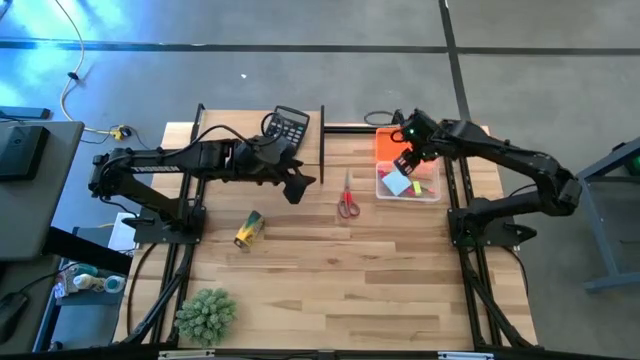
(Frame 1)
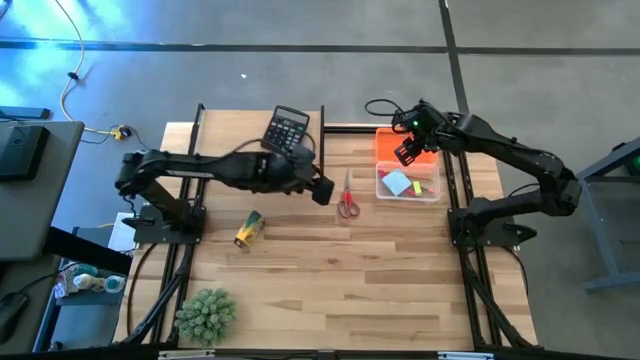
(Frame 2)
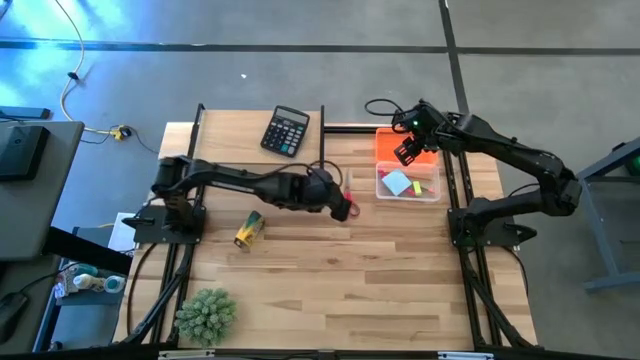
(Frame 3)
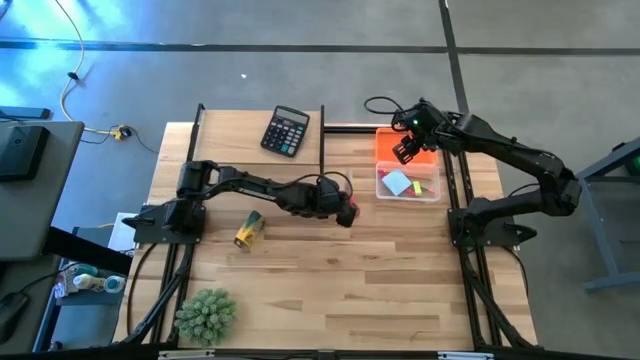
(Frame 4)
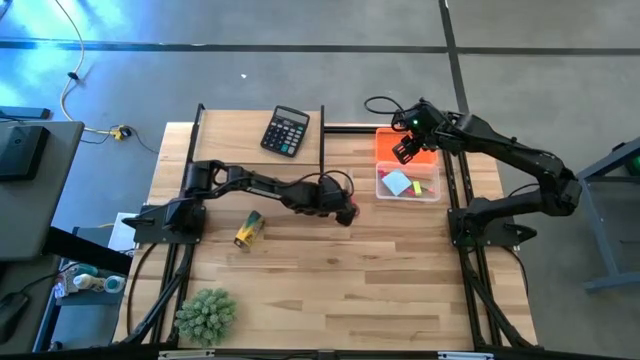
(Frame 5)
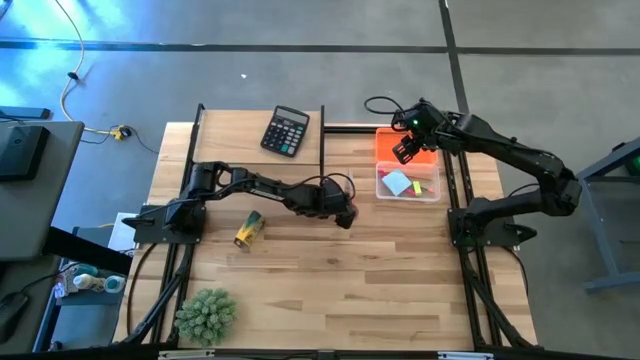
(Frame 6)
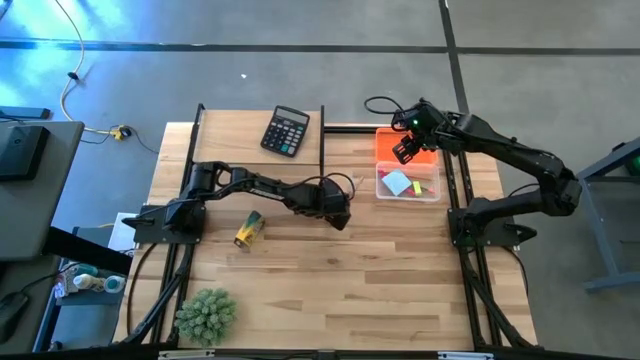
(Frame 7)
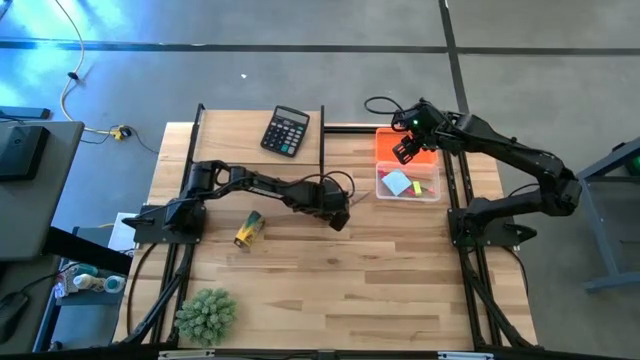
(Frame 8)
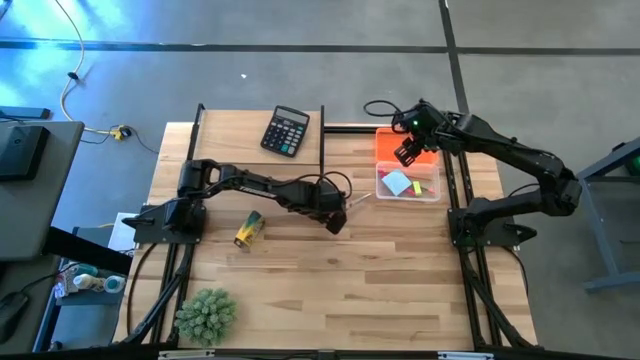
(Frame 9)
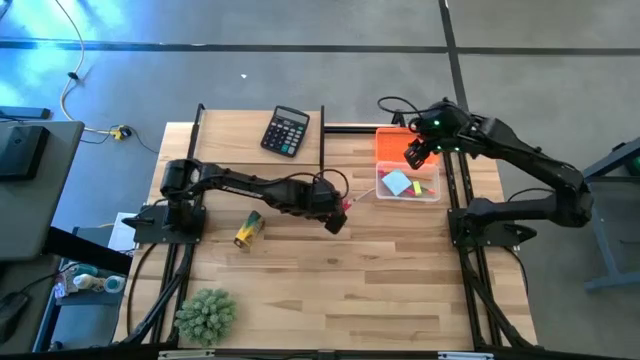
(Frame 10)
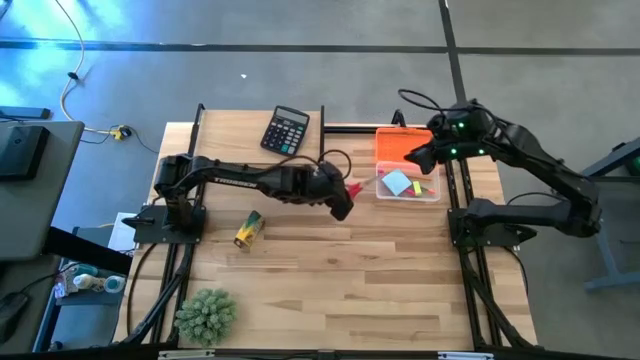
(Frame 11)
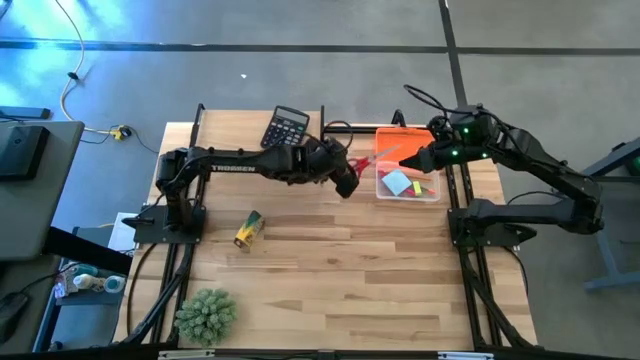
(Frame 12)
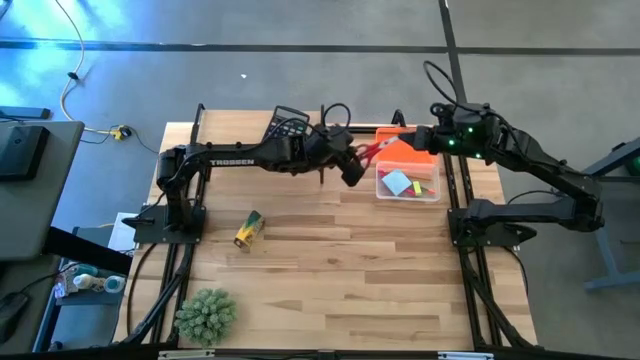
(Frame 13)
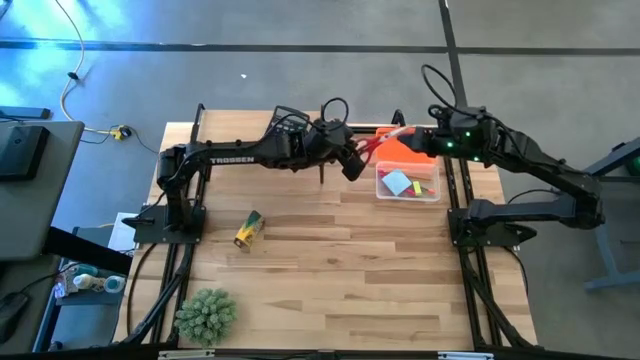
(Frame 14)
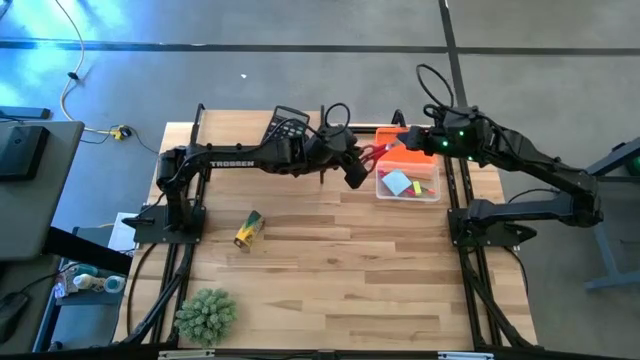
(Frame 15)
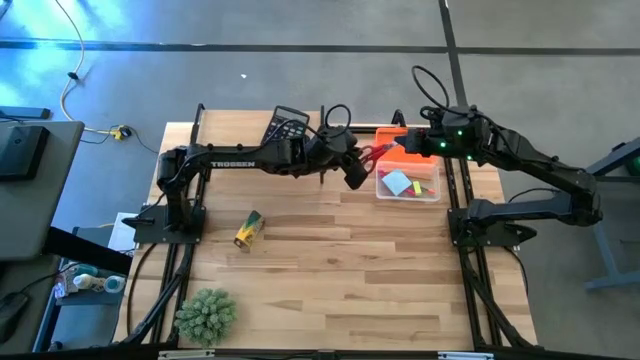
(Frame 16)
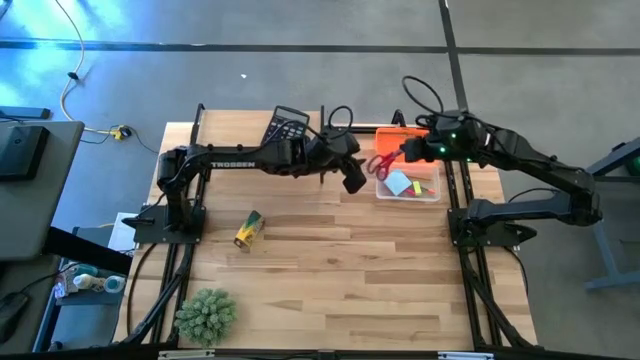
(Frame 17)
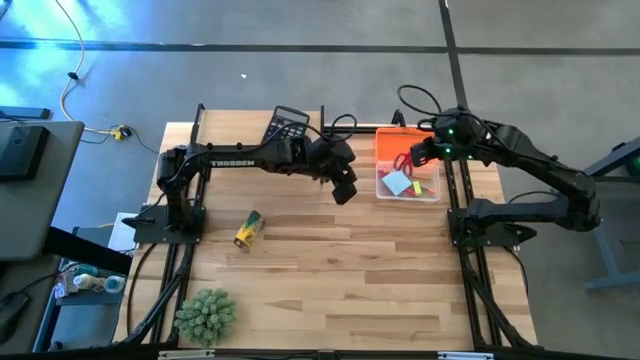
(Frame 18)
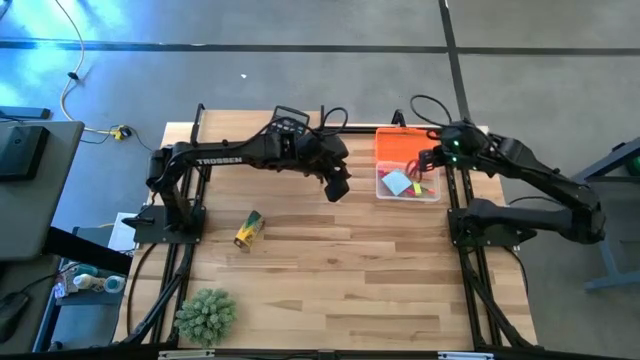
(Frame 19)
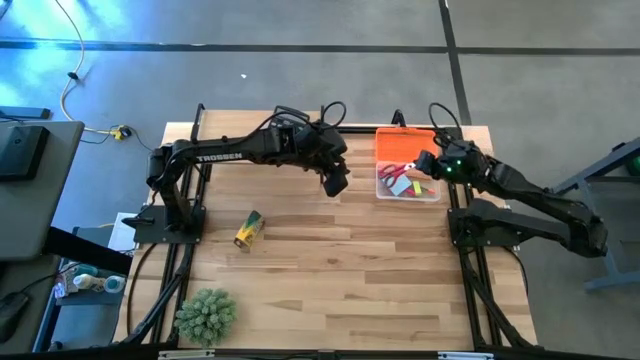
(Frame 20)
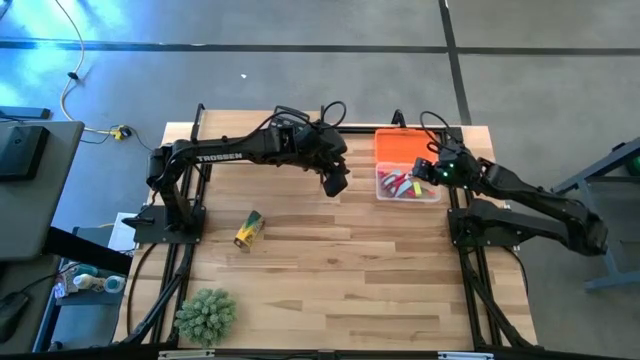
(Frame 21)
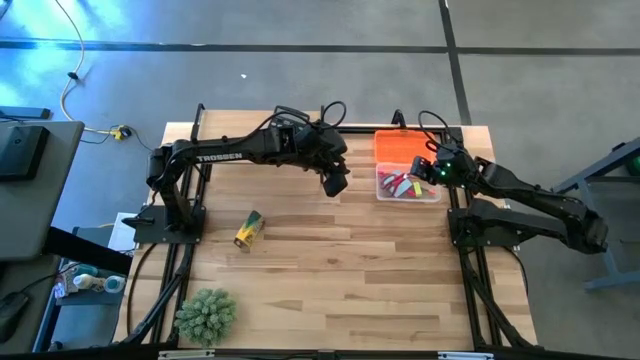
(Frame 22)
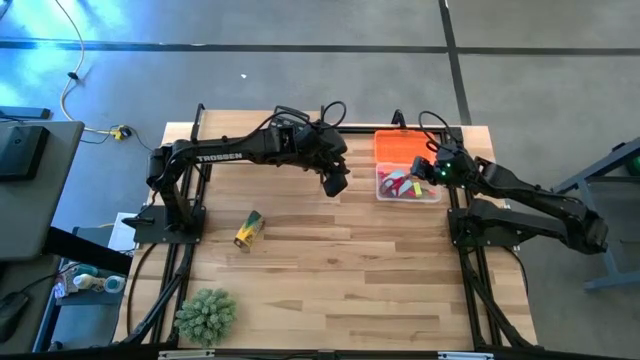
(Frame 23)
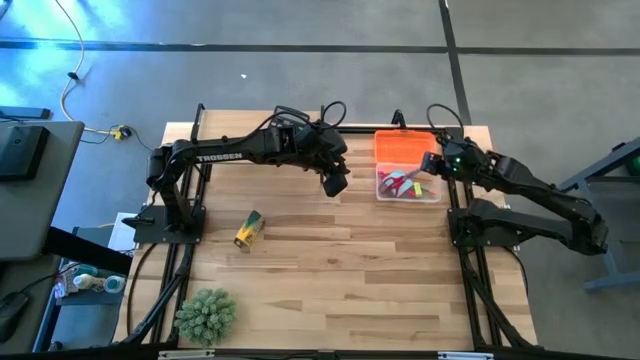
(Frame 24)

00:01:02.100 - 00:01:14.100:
Task: Pack school essentials
Put the red scissors into the orange supply box

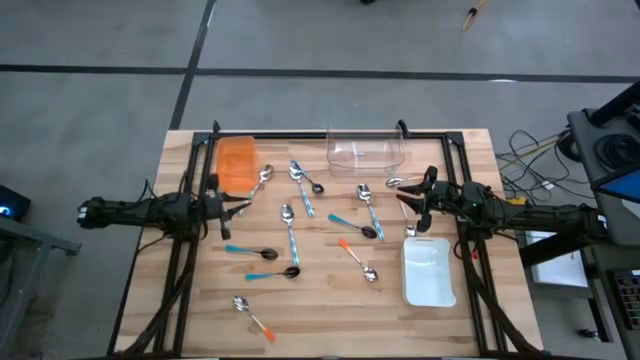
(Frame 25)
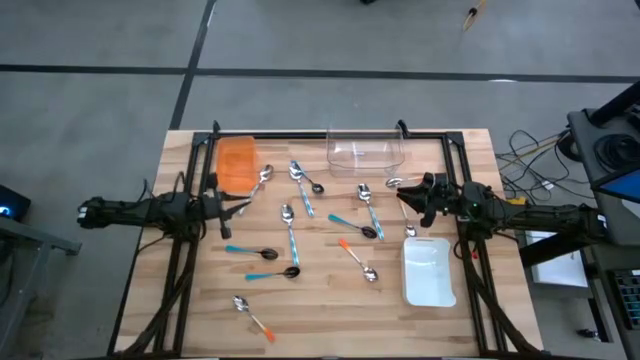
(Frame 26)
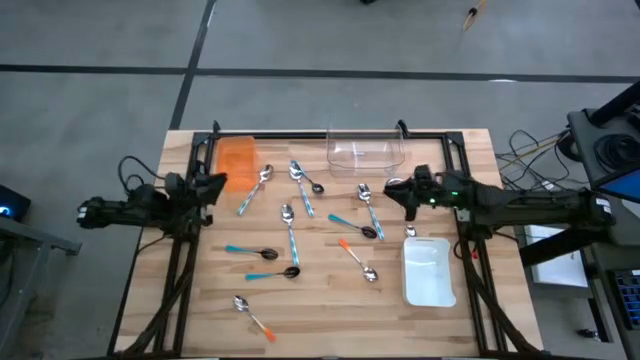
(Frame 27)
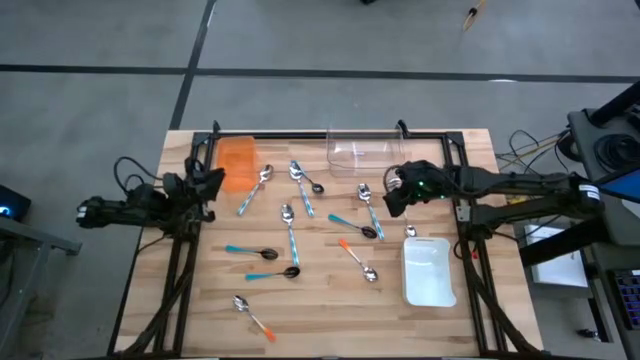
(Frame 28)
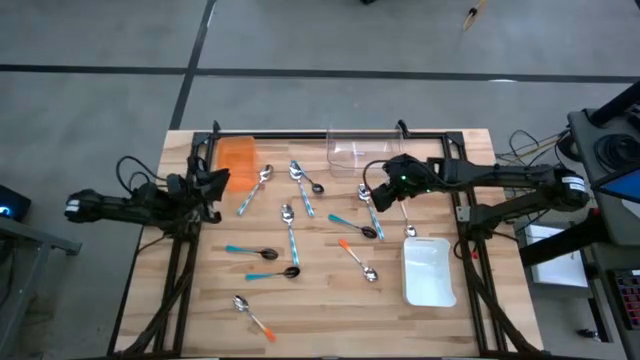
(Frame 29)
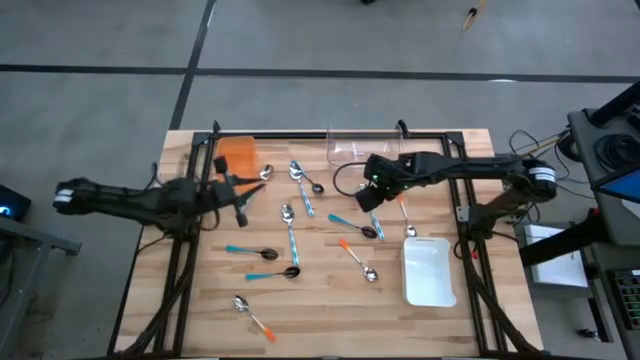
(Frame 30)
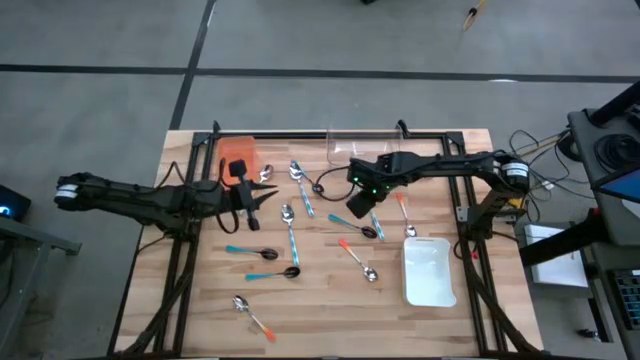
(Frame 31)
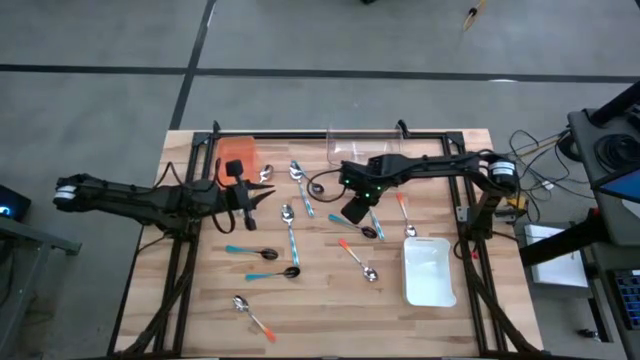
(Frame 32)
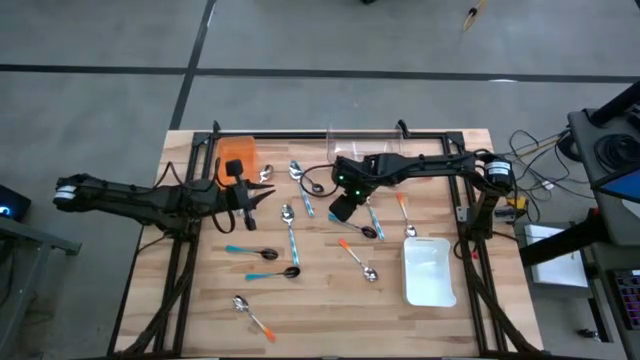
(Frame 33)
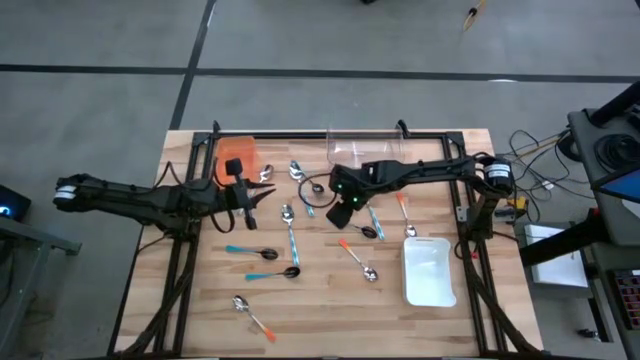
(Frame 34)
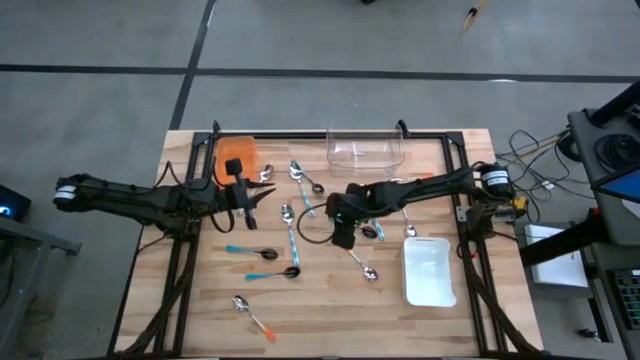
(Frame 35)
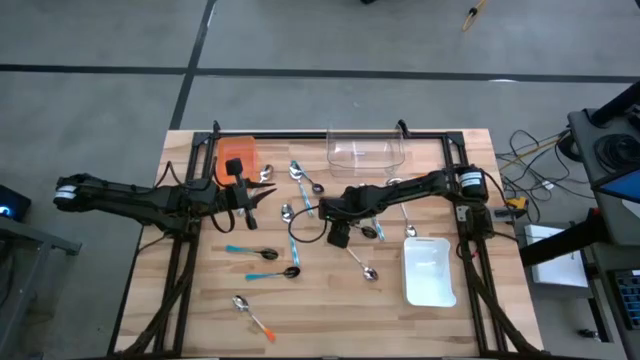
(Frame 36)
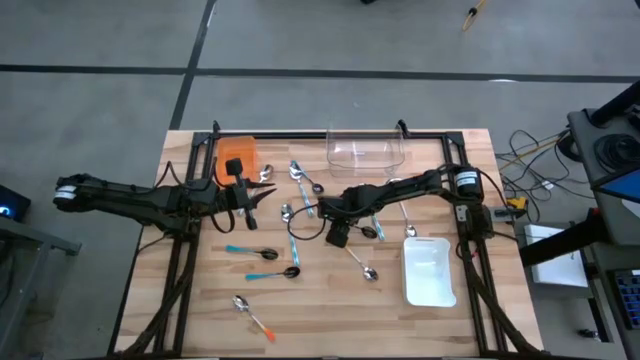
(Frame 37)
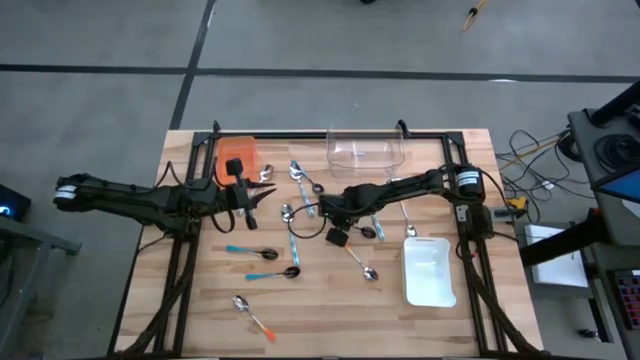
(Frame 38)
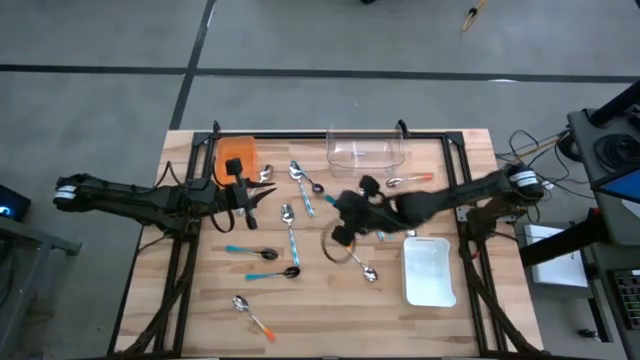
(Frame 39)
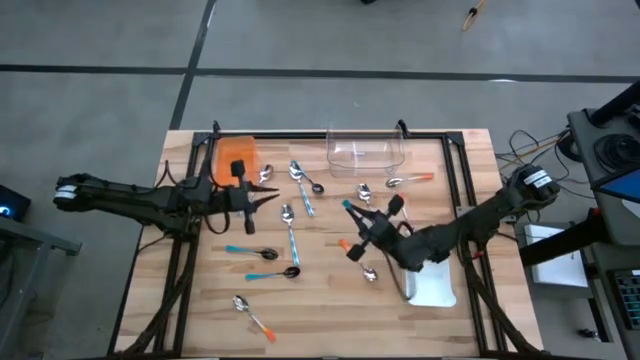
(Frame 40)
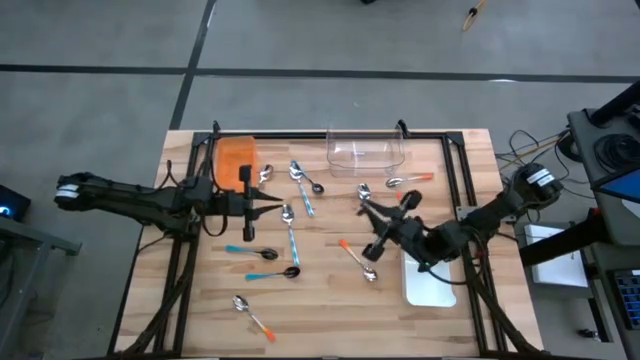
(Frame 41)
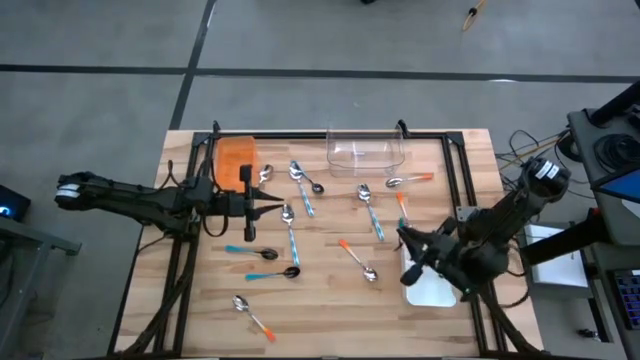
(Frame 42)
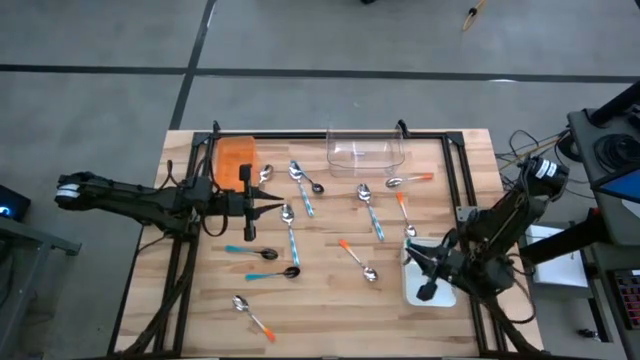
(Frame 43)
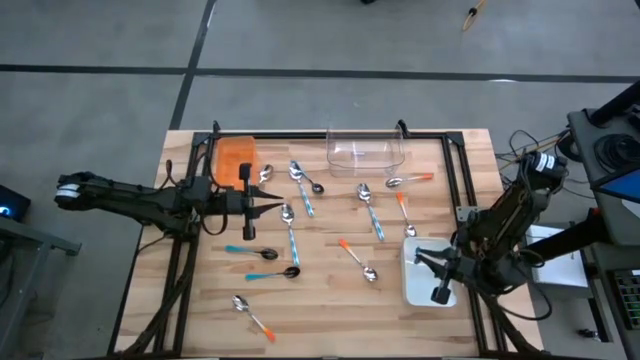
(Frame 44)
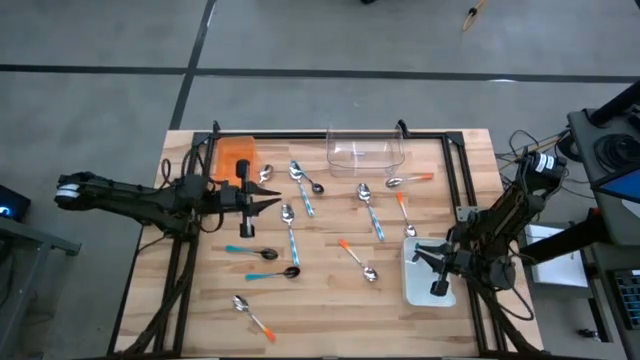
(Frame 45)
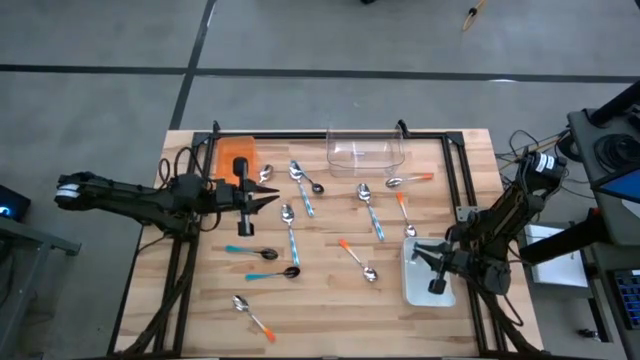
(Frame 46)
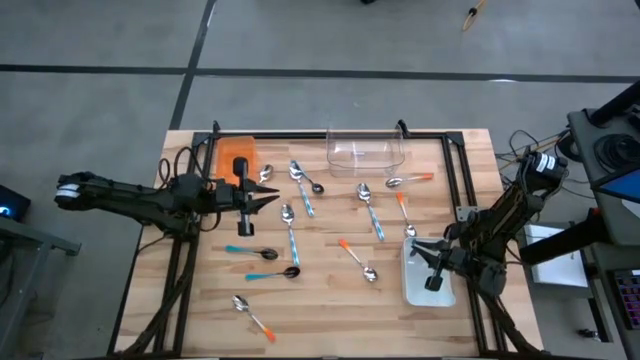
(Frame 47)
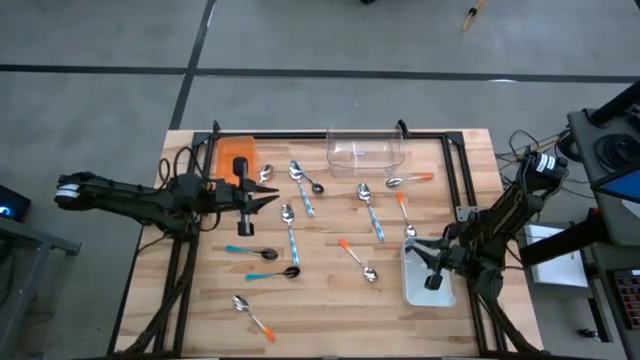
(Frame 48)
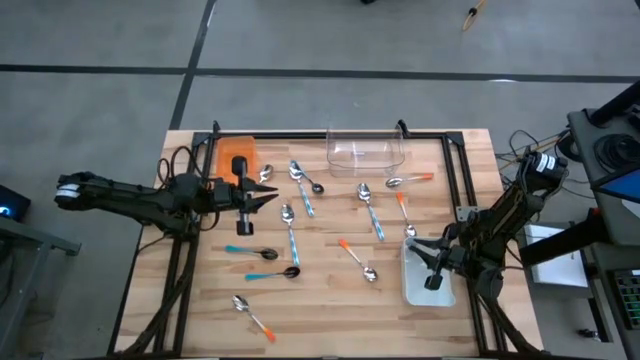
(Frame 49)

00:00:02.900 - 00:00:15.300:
Task: Sort silverware by color (type)
Put the blue spoon into the white bin
